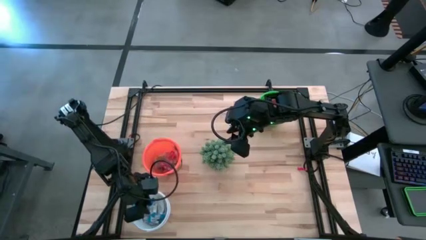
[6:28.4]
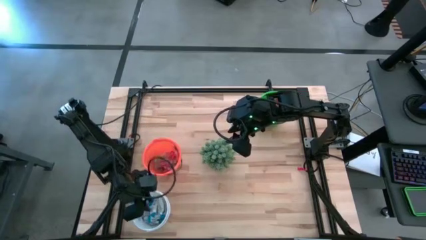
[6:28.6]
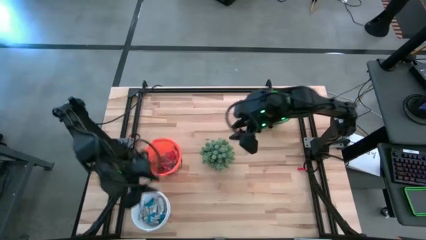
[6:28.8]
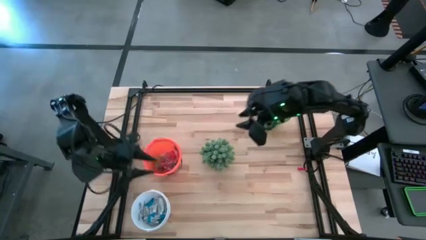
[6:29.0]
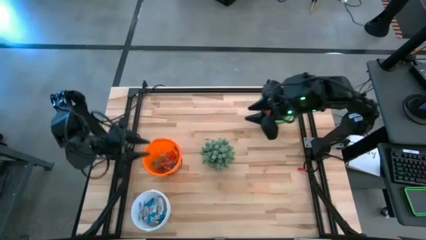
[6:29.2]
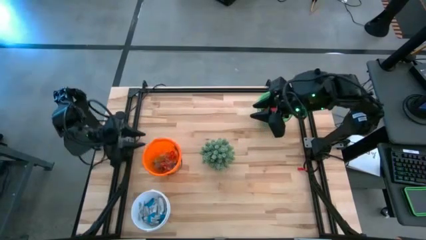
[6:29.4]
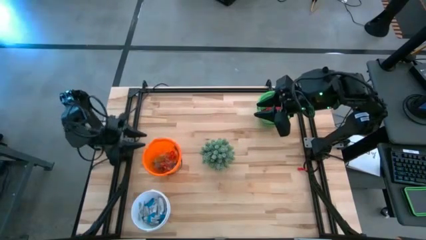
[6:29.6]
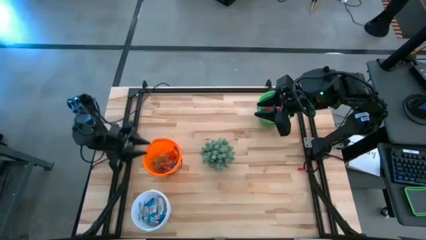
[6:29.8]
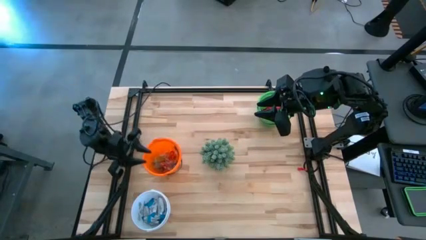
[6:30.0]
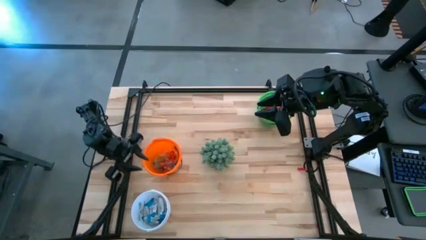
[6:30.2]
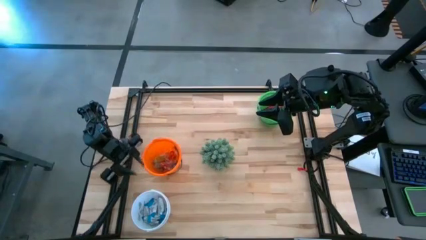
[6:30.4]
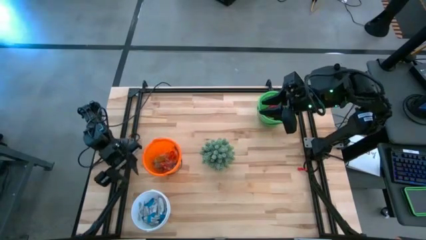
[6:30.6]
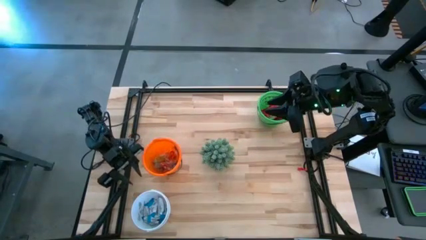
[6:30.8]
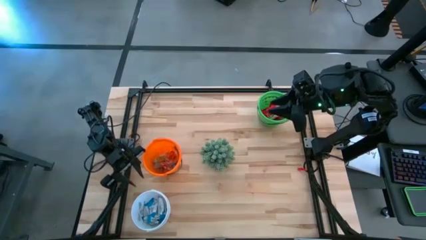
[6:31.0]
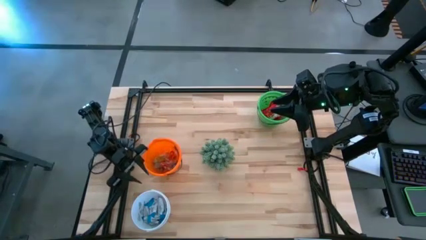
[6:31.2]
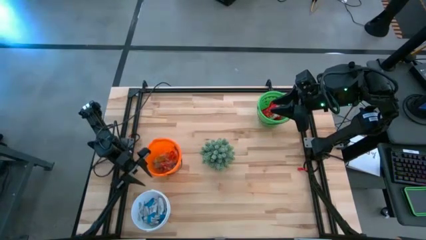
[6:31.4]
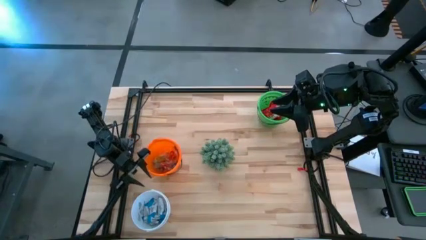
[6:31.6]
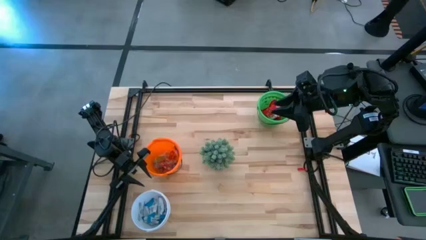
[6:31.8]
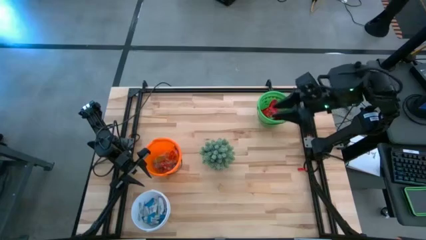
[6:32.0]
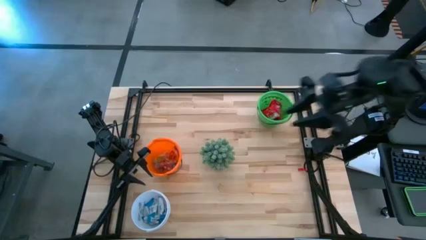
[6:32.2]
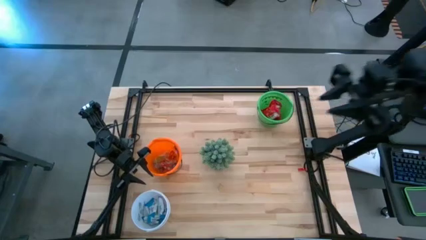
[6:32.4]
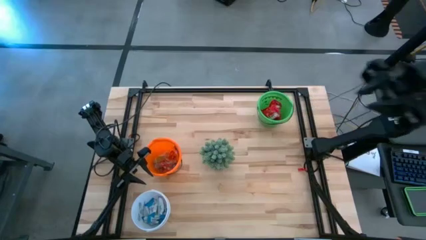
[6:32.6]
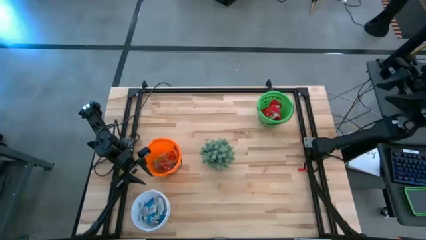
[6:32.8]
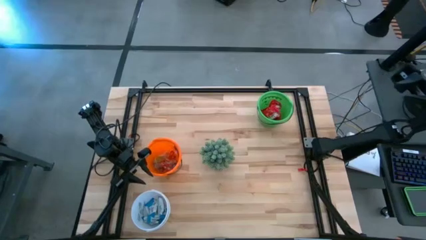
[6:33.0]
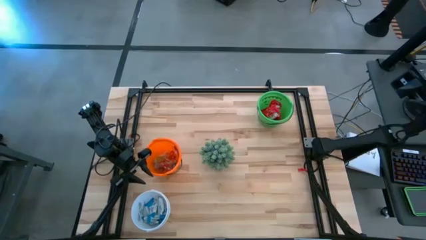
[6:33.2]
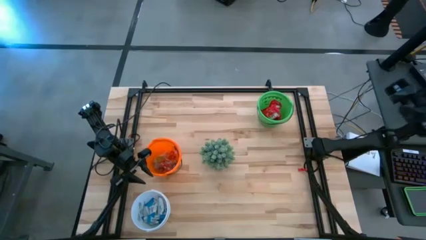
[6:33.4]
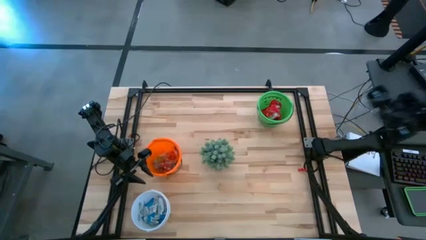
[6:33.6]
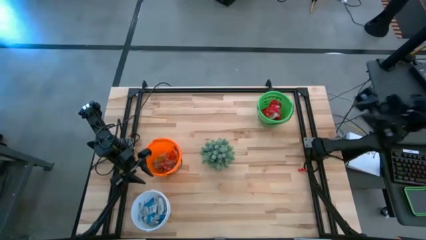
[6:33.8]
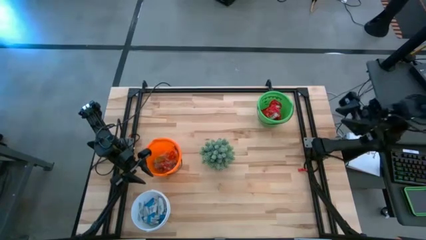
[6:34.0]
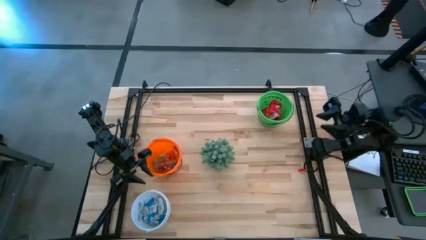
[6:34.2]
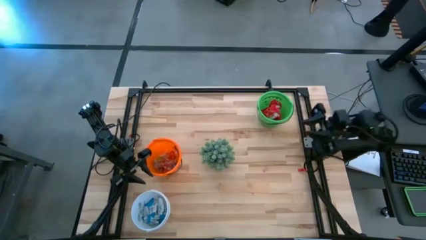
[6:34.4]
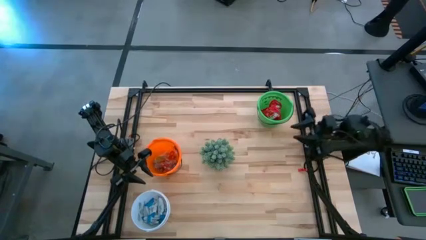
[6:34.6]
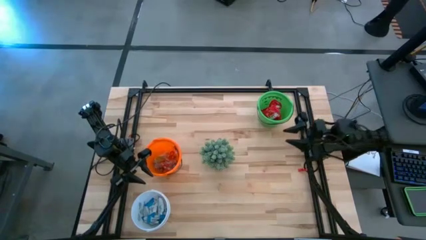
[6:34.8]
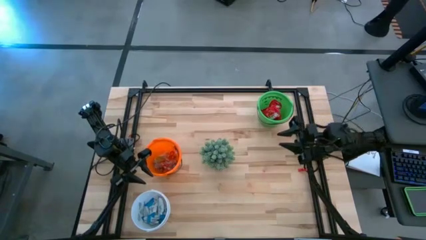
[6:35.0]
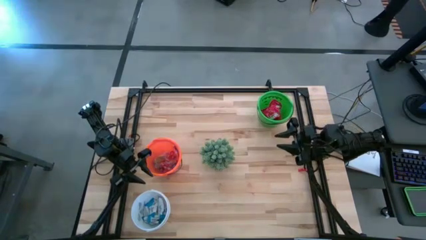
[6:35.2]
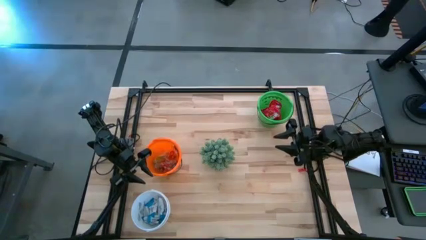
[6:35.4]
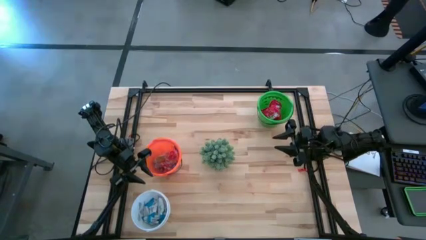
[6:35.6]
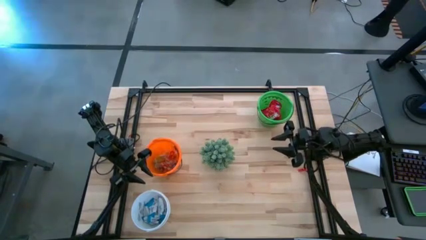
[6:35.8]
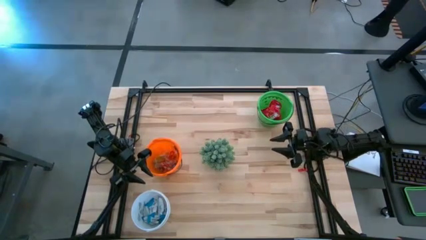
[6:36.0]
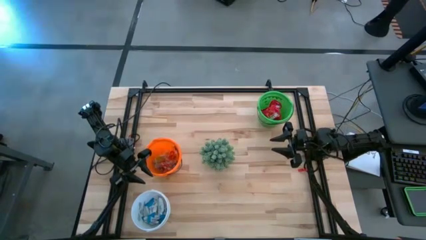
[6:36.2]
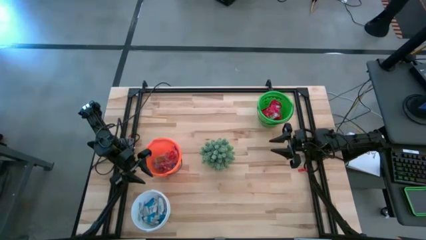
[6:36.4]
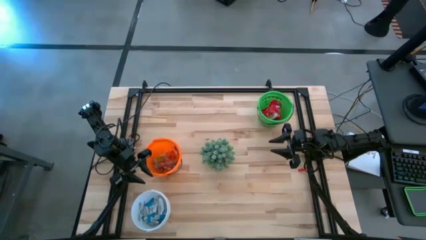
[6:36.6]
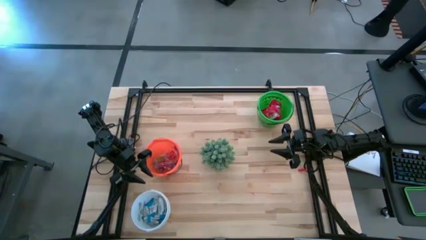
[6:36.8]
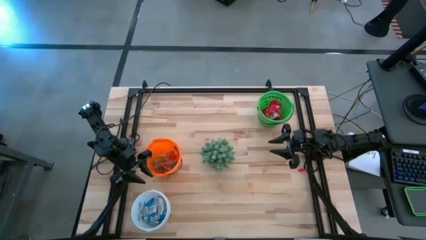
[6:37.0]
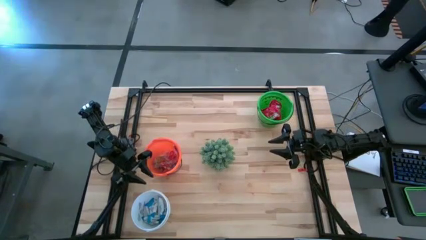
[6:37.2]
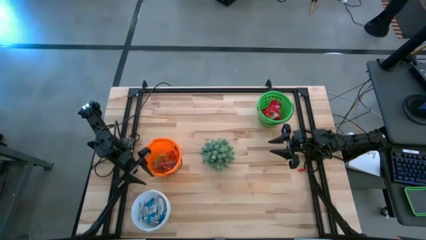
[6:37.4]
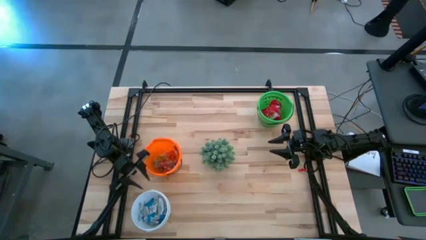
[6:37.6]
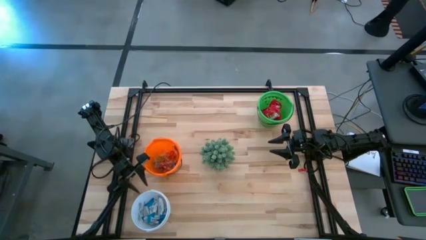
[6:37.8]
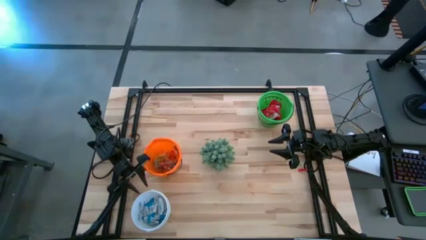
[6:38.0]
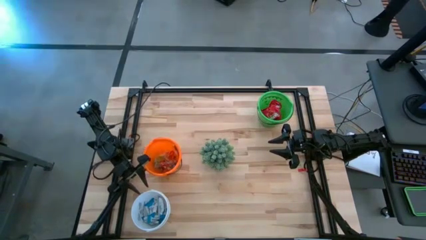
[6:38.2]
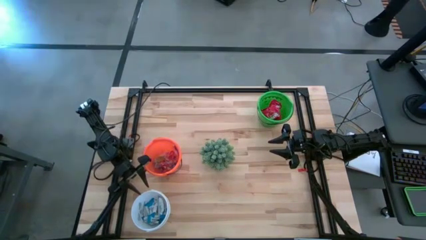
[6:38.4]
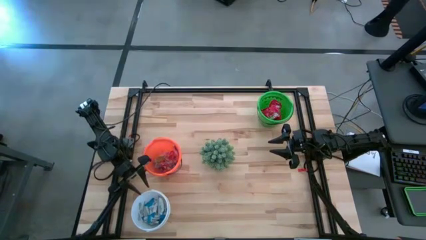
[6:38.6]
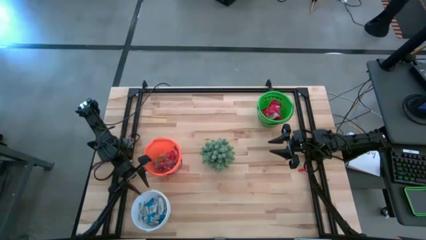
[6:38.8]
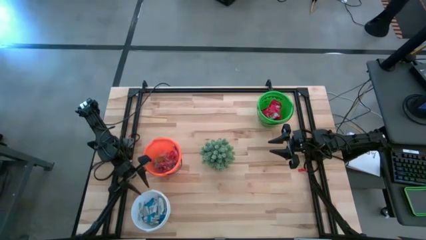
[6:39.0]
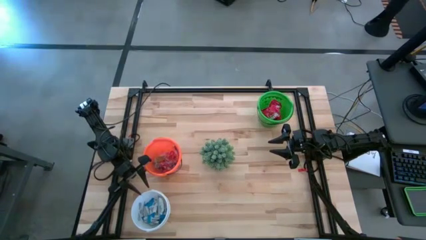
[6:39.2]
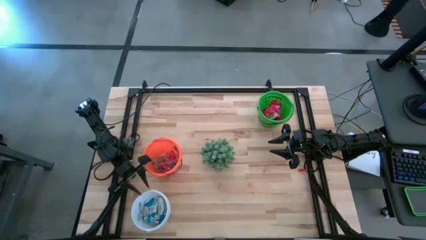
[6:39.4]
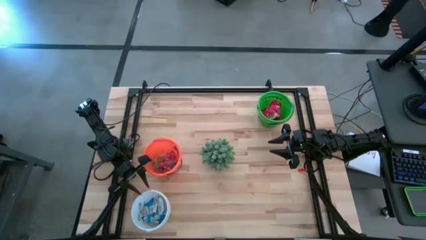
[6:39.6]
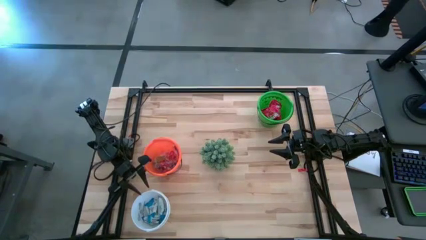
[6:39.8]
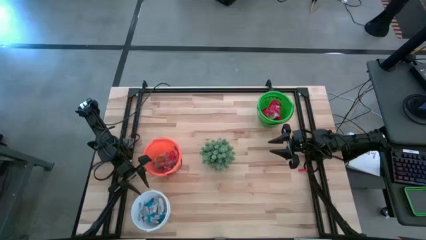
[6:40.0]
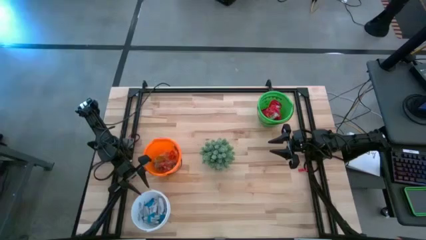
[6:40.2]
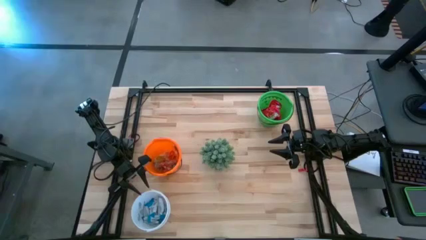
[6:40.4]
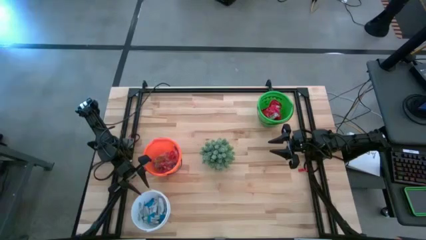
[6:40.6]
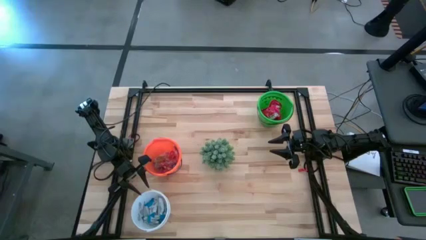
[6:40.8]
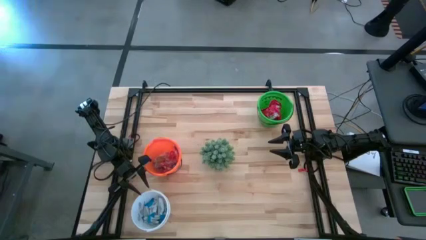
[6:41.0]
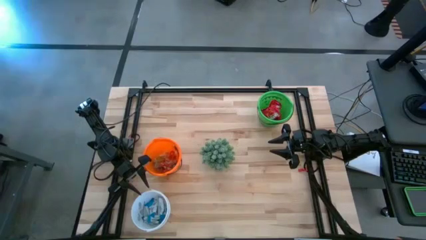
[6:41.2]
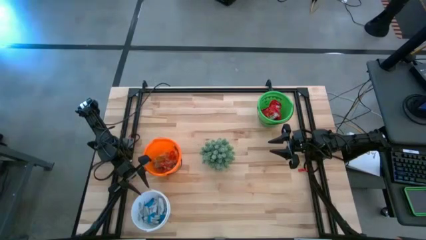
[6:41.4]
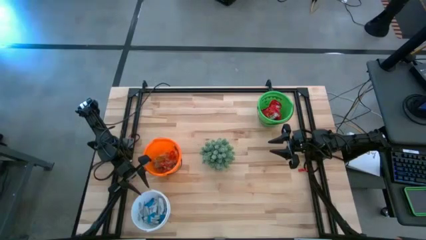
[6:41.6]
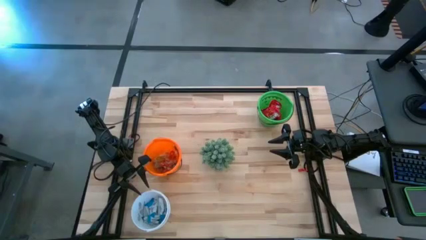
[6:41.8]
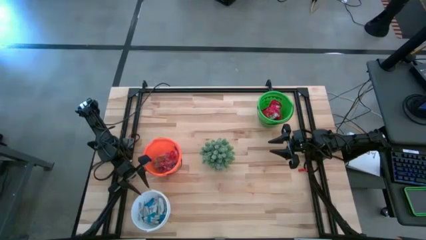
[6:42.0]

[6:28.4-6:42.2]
Task: Sort candy
Return to Home Position

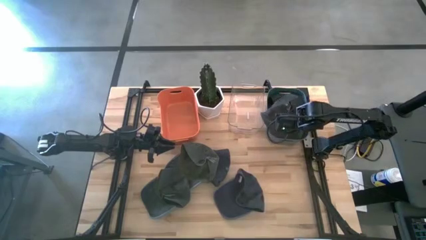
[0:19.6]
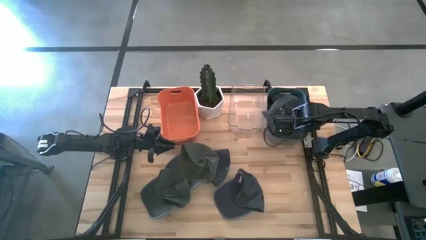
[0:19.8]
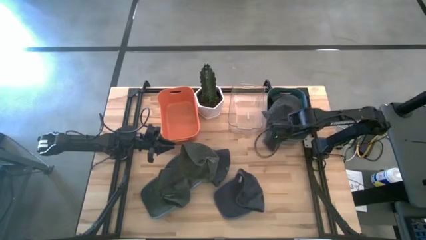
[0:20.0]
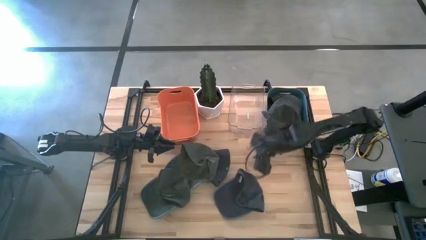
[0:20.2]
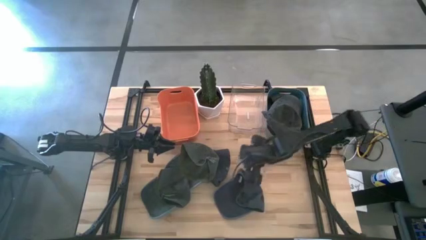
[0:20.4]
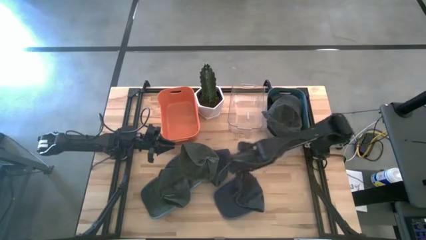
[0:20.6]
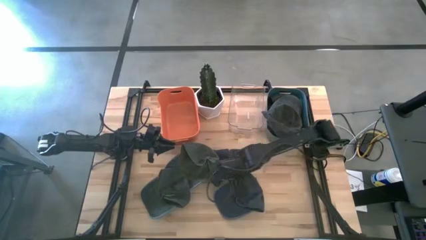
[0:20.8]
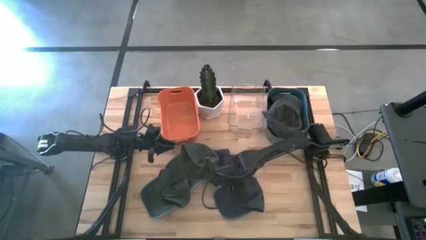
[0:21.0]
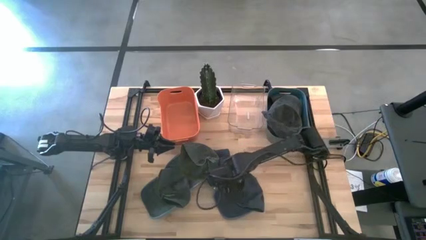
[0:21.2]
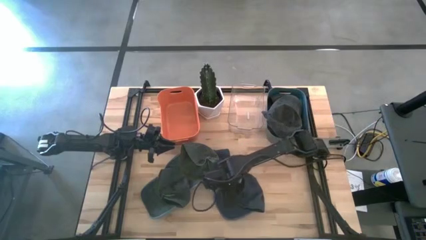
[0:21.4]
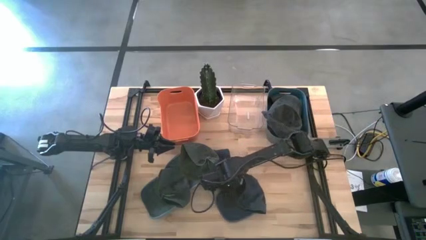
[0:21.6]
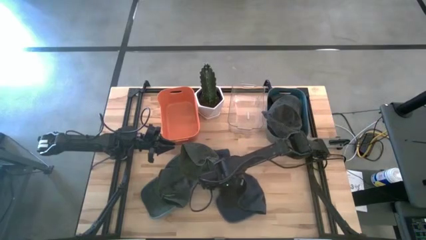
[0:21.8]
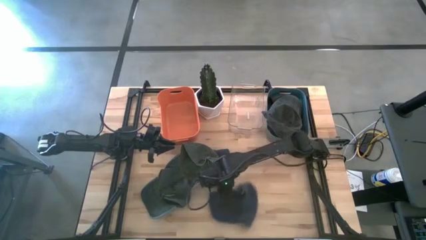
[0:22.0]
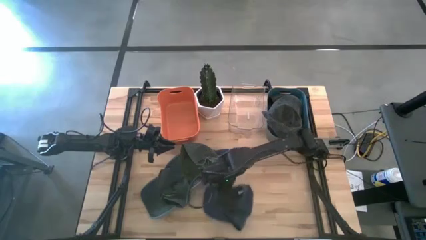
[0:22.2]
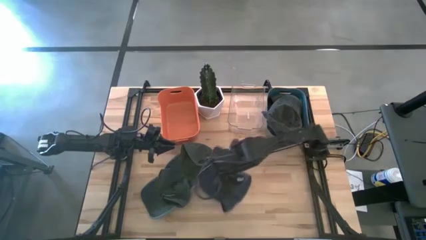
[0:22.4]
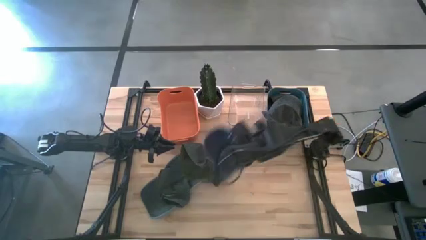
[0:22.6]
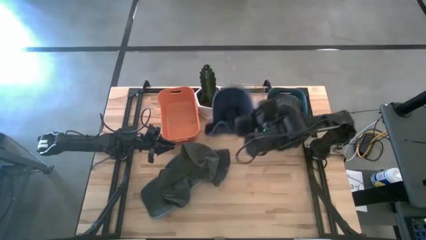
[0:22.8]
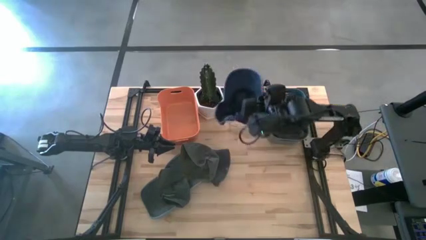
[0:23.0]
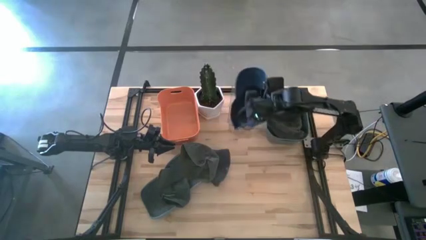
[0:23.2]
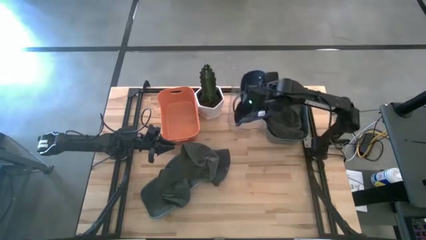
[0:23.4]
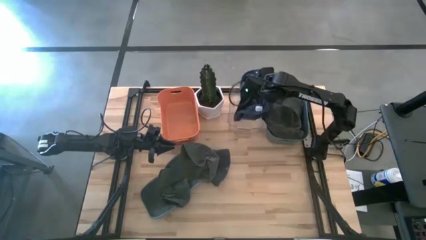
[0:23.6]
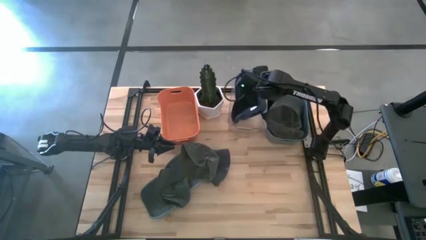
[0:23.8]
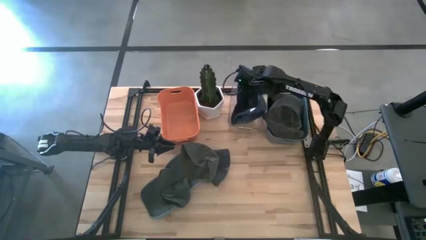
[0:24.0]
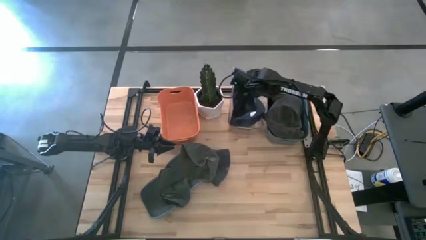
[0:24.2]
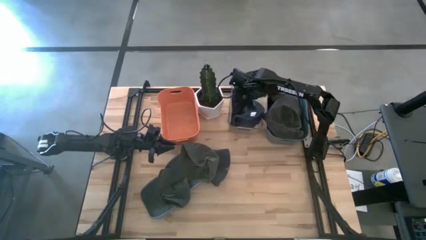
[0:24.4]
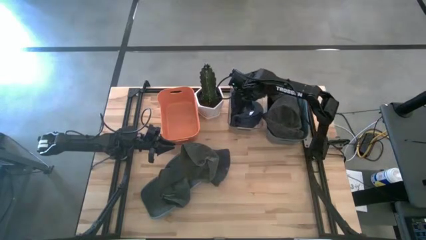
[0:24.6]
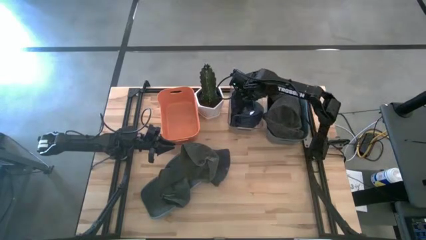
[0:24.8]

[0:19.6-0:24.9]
Task: Pick & Place hat
Put the bottom blue cap into the transparent bin
